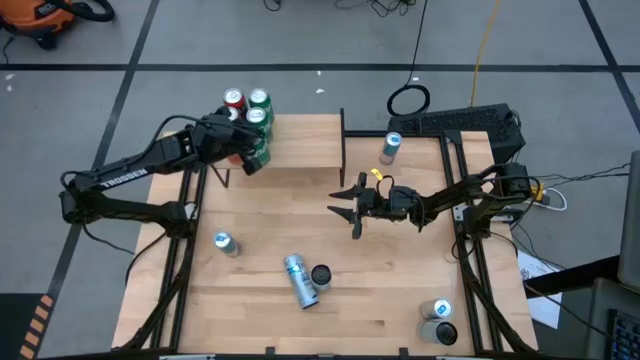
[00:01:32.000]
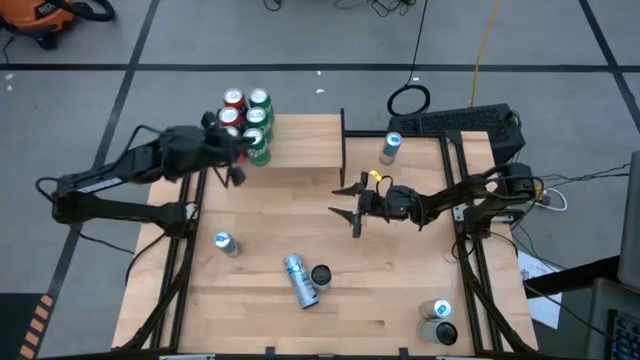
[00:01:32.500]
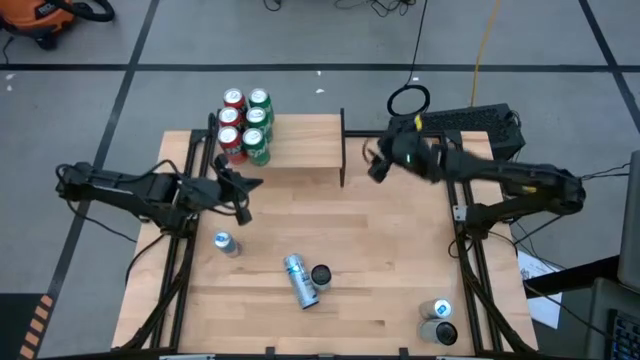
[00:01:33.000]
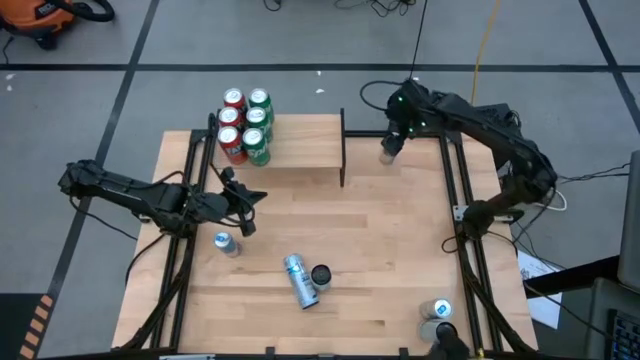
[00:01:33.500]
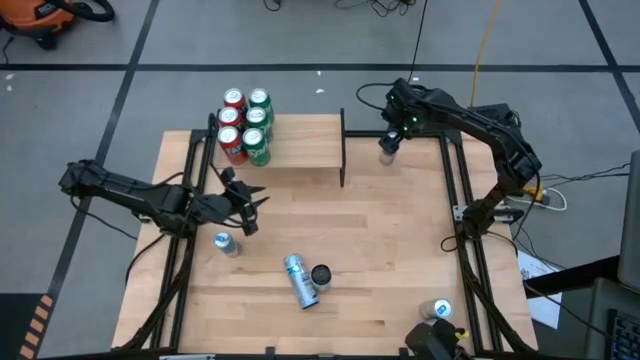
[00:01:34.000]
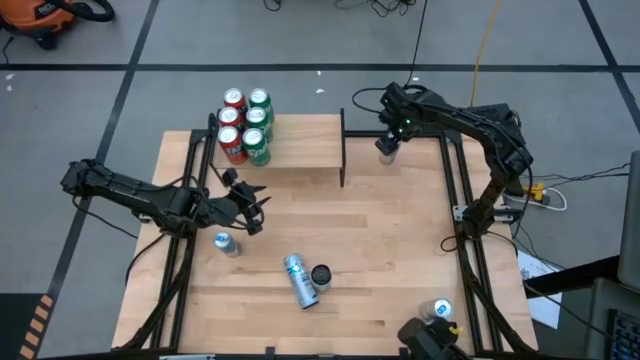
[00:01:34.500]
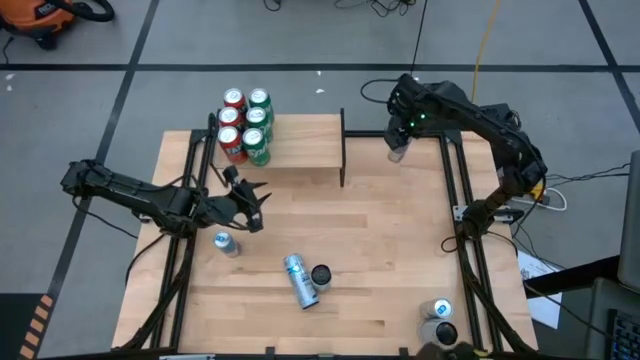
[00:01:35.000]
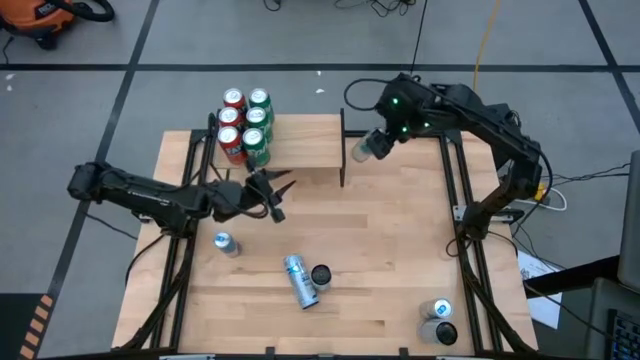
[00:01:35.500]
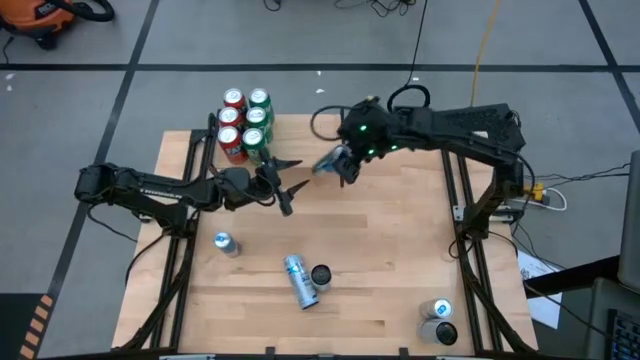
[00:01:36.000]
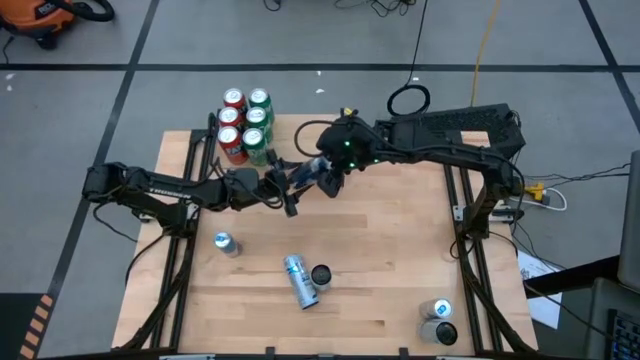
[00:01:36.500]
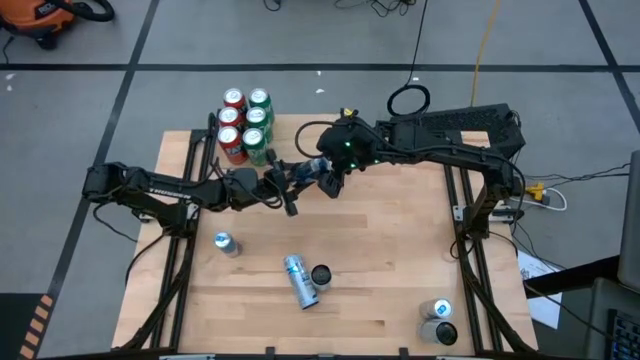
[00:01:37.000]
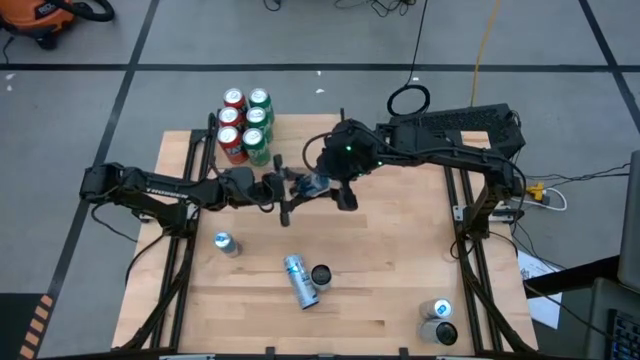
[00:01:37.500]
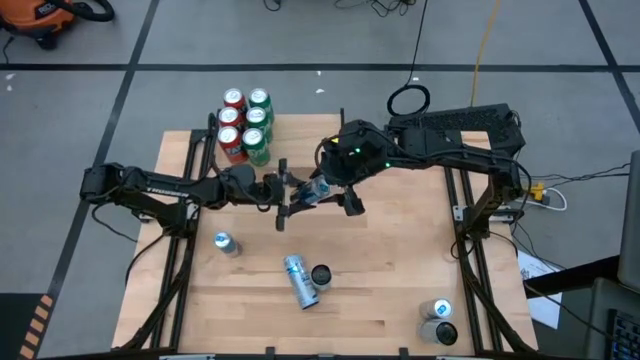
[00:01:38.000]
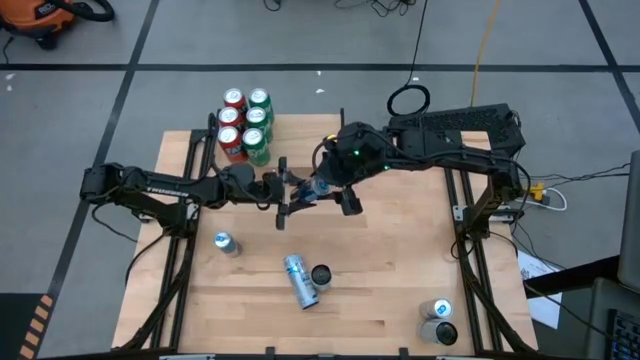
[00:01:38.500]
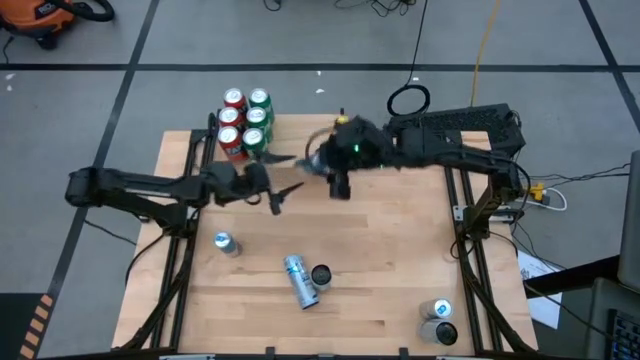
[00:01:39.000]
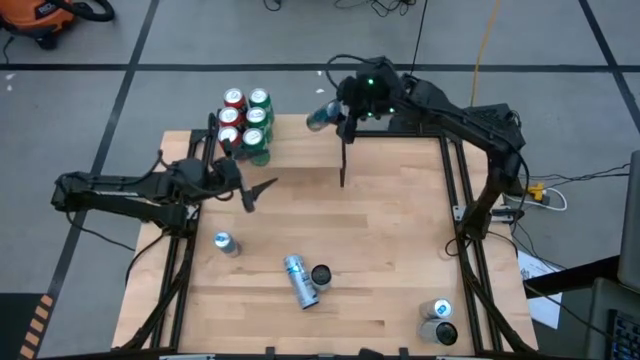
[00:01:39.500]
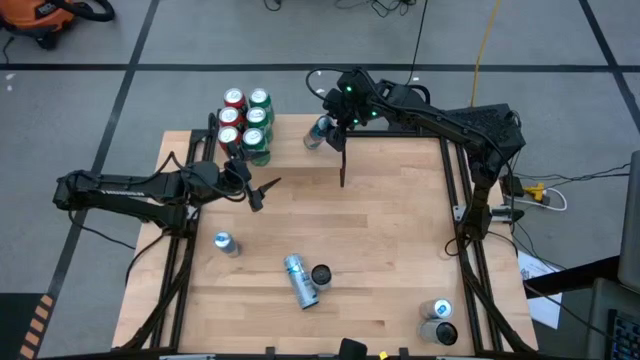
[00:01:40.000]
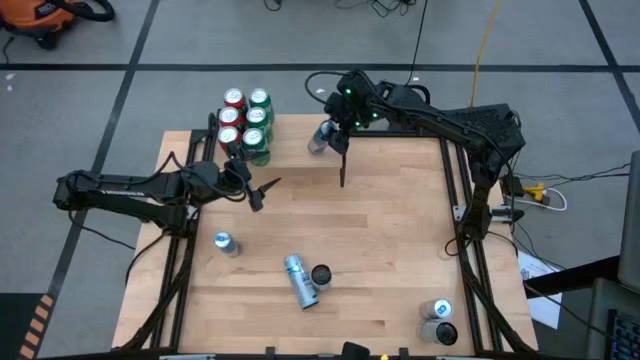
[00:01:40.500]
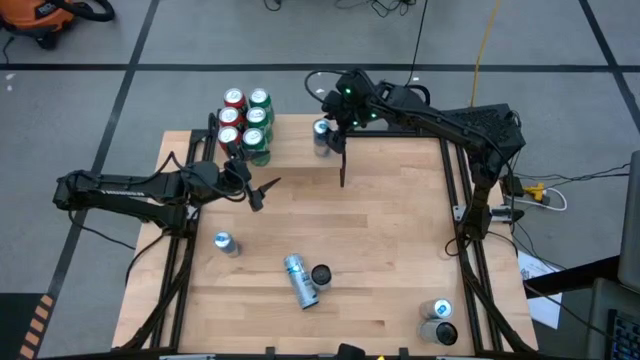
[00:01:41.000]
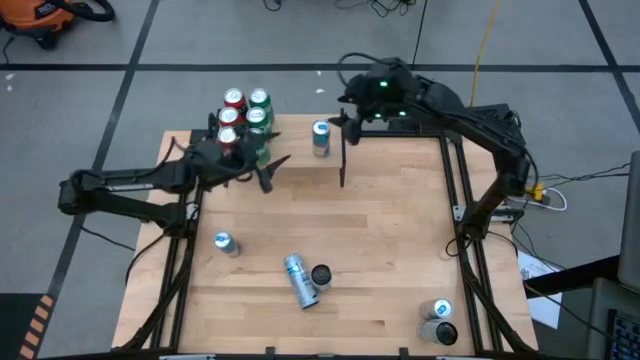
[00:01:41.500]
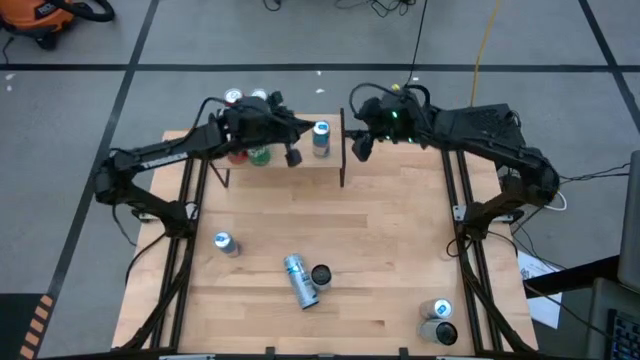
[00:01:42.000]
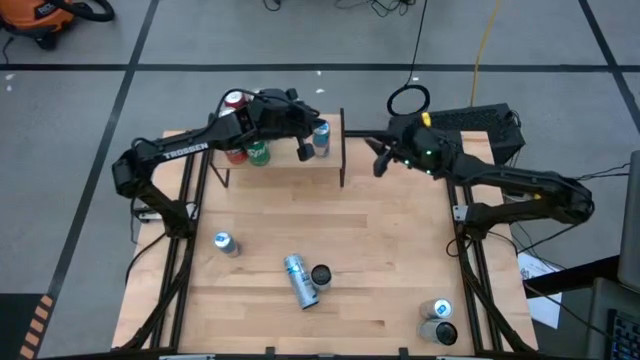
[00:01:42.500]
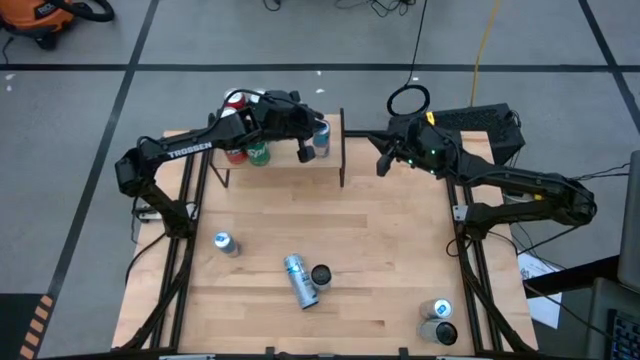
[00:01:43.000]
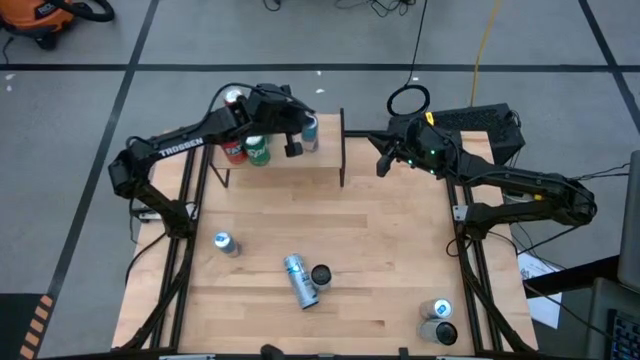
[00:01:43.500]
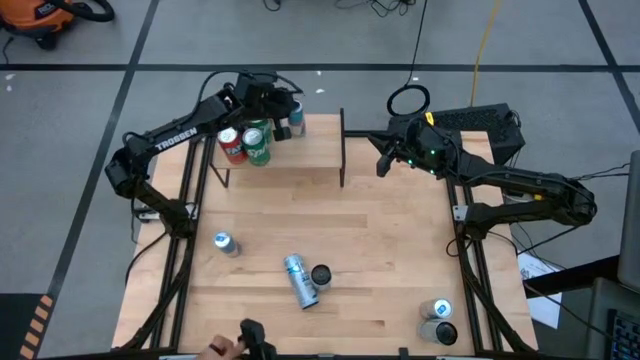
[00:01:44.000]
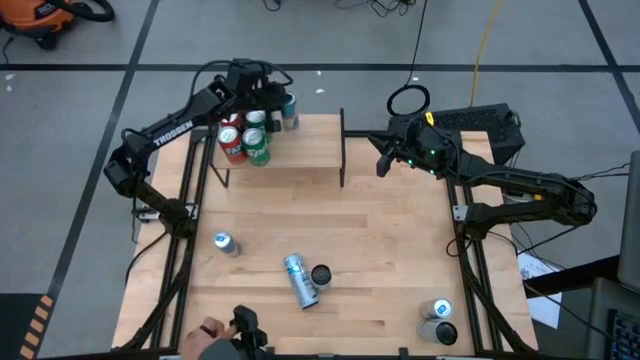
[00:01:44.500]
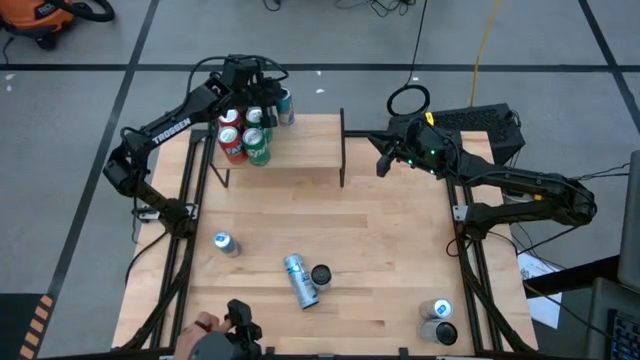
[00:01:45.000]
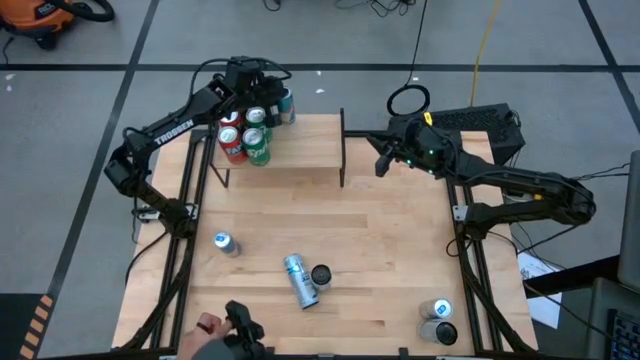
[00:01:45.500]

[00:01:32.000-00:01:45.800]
Task: Place canned beverage on shelf
Put the top right blue soda can on the shelf

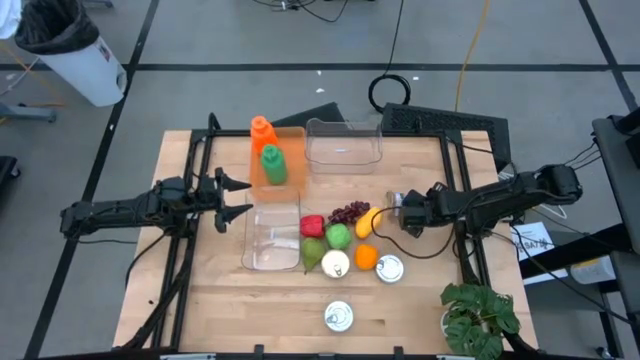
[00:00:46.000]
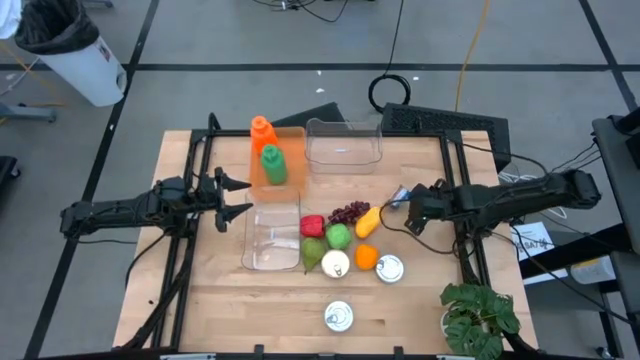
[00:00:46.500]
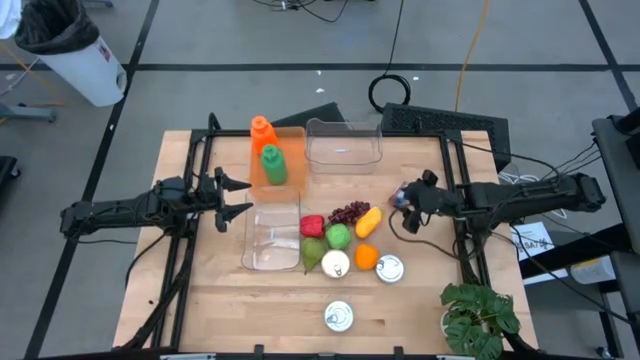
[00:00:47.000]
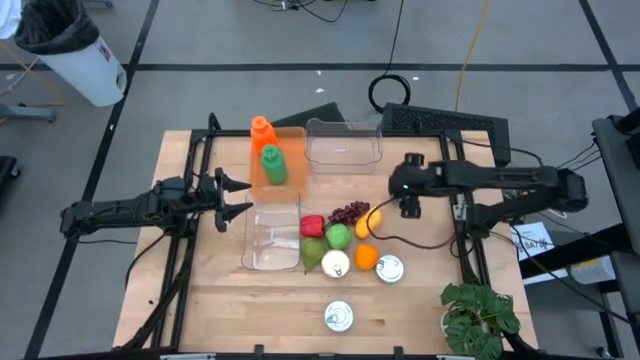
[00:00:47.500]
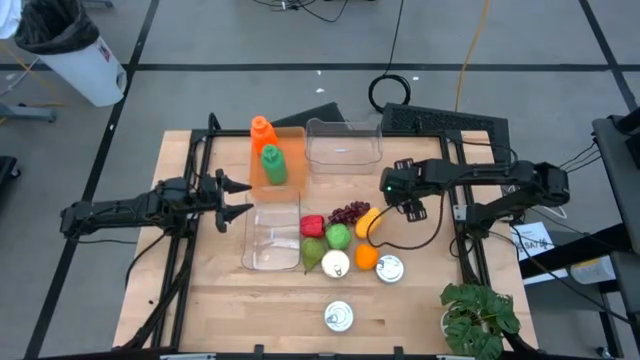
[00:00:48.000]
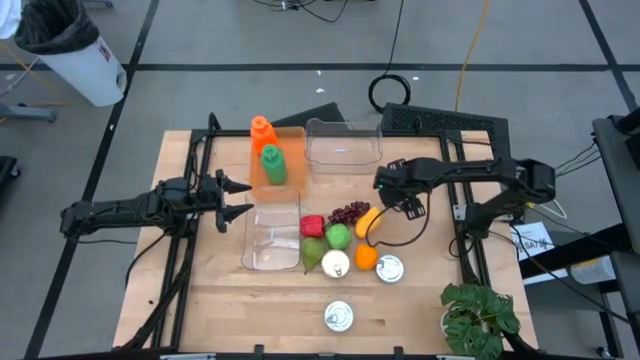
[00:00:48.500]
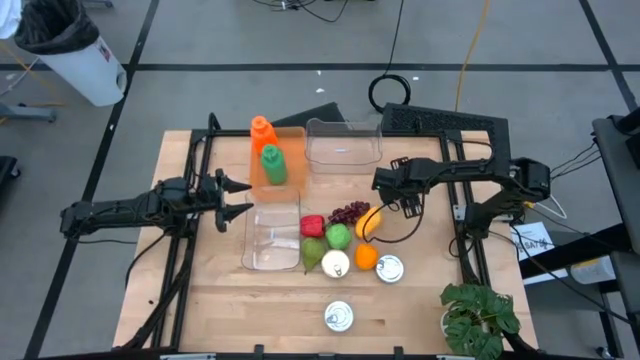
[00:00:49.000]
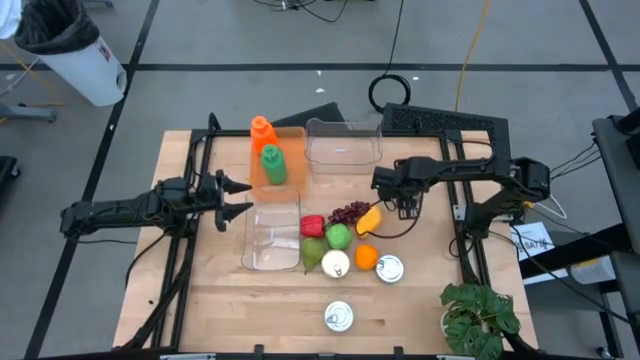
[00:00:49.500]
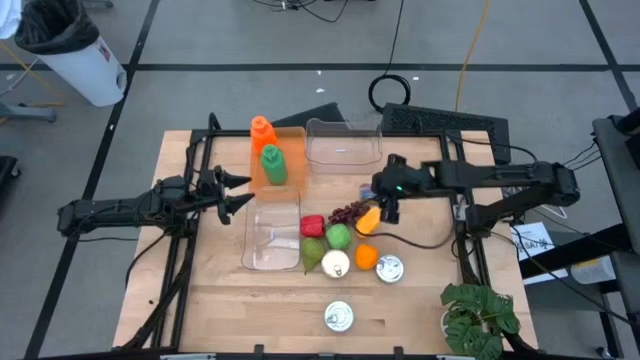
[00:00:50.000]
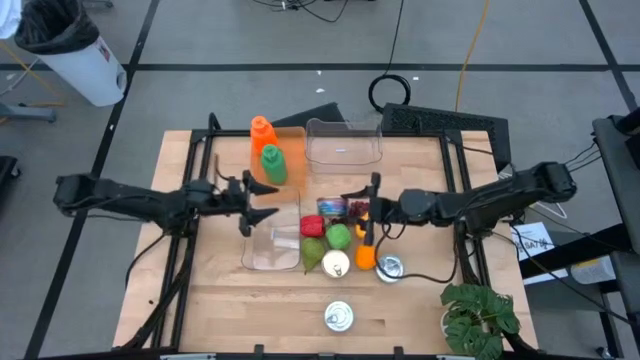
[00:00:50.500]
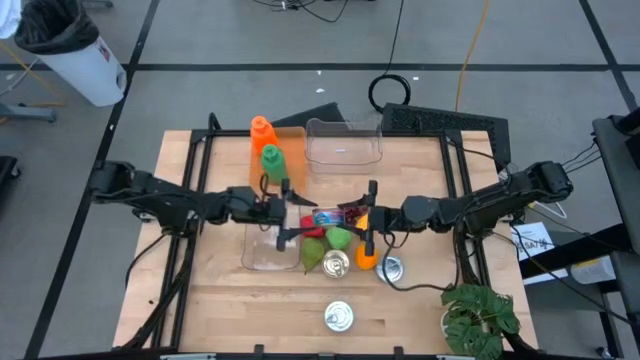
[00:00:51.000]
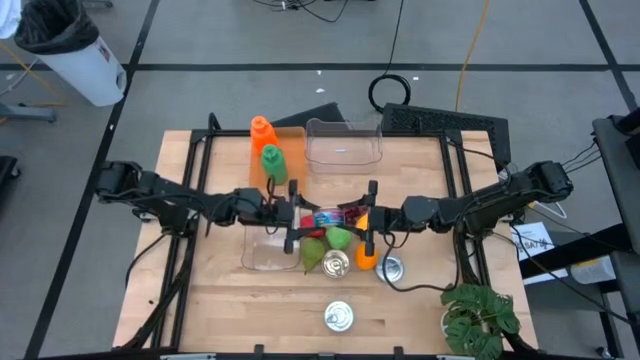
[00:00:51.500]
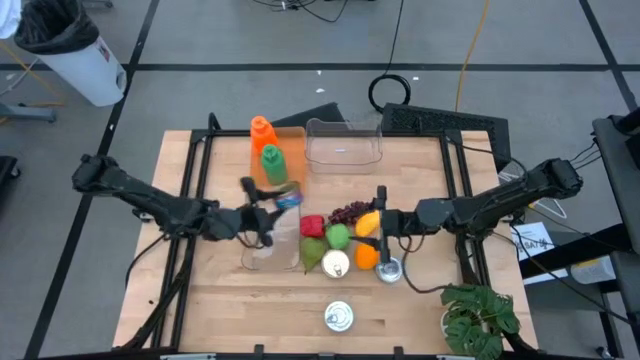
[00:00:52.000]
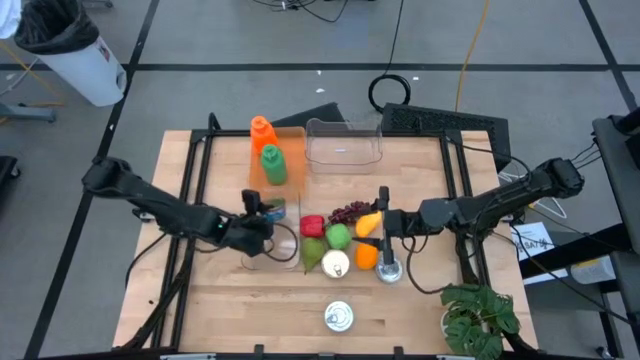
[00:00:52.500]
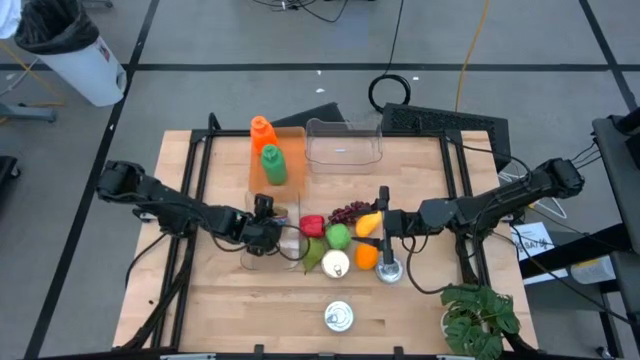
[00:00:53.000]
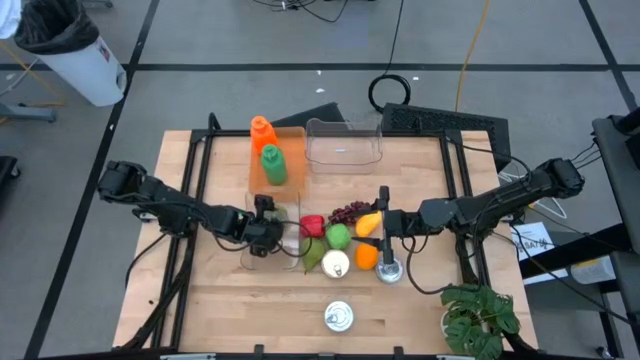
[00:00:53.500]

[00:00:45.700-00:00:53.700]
Task: Pick & Place Food Item
Put the blue and pink tuna can into the bottom transparent bin
